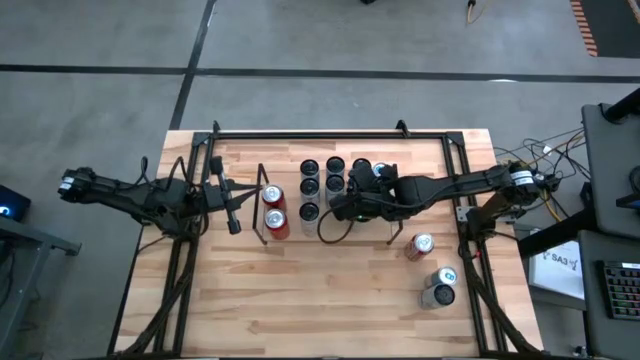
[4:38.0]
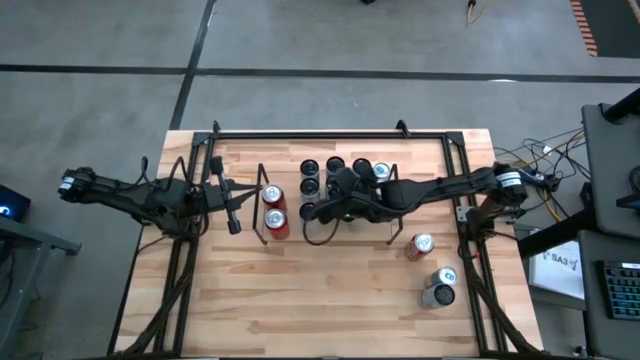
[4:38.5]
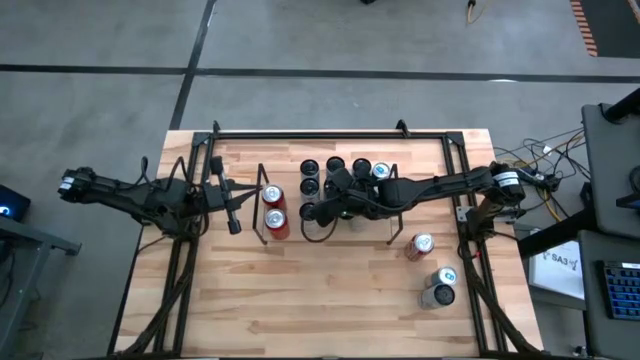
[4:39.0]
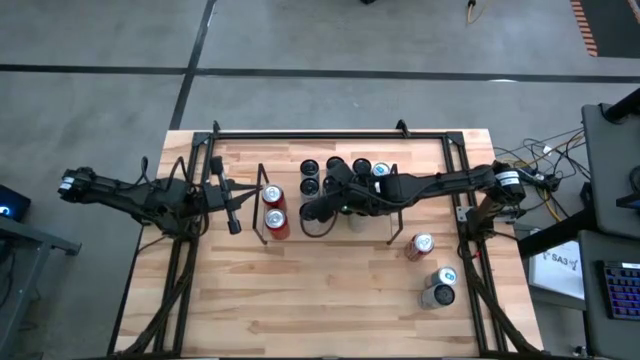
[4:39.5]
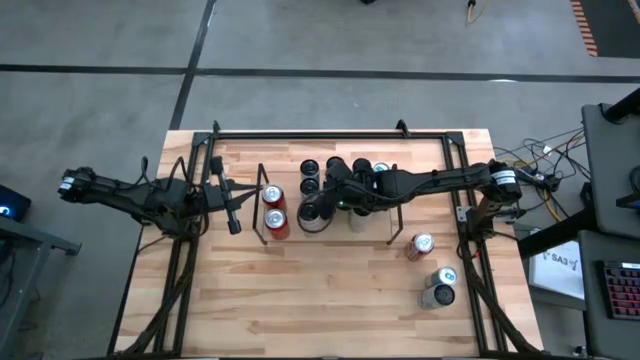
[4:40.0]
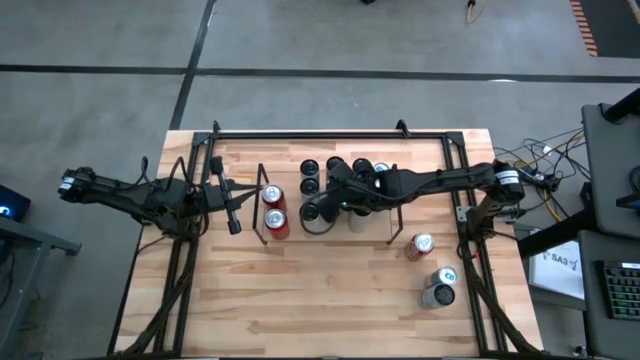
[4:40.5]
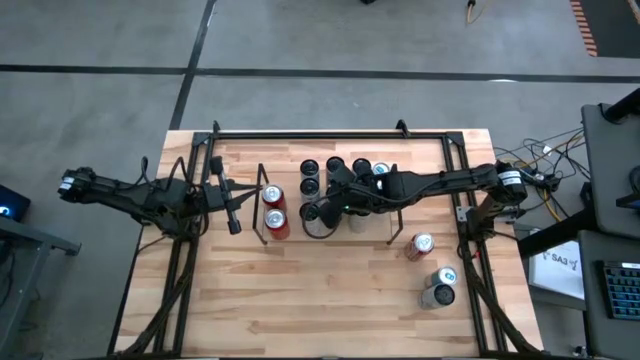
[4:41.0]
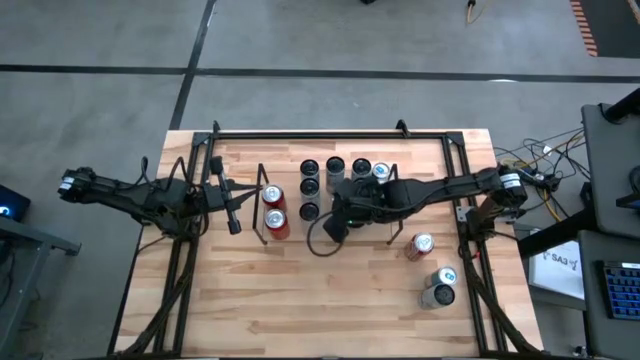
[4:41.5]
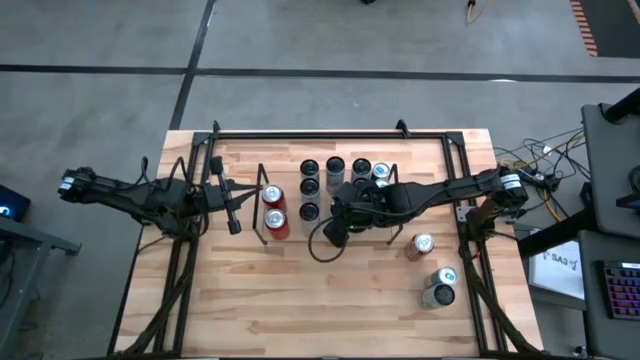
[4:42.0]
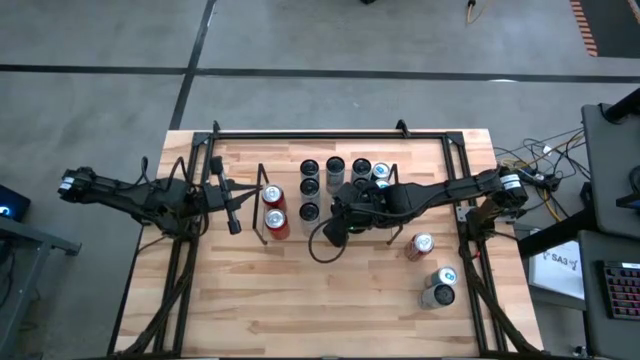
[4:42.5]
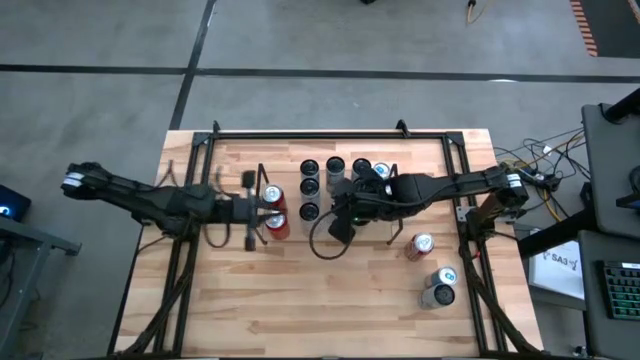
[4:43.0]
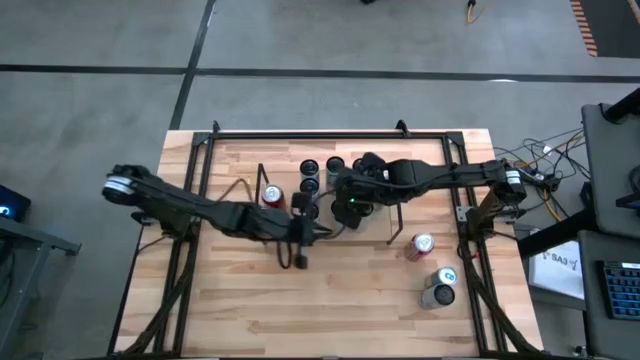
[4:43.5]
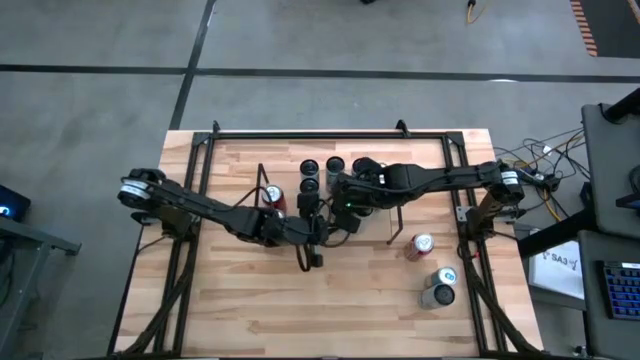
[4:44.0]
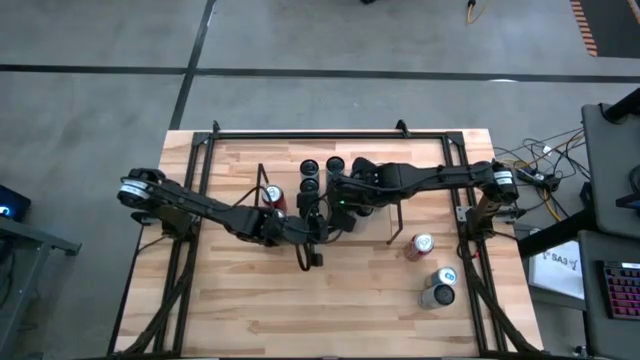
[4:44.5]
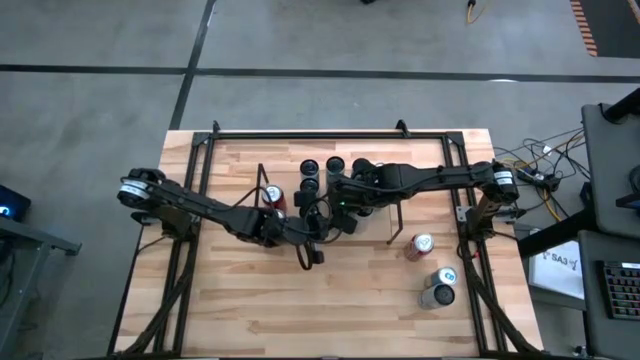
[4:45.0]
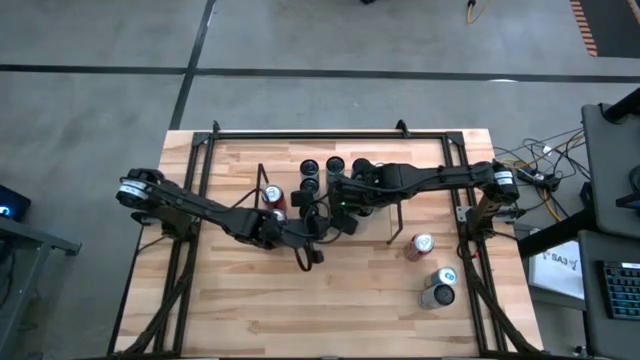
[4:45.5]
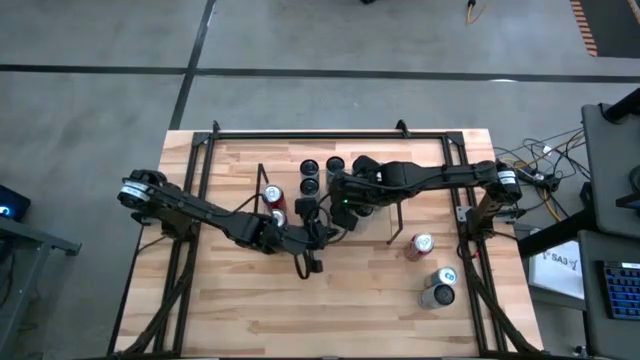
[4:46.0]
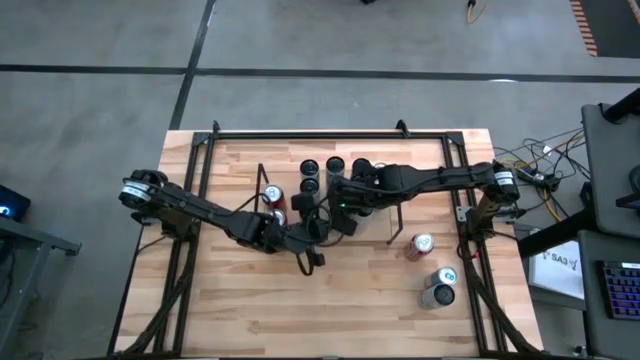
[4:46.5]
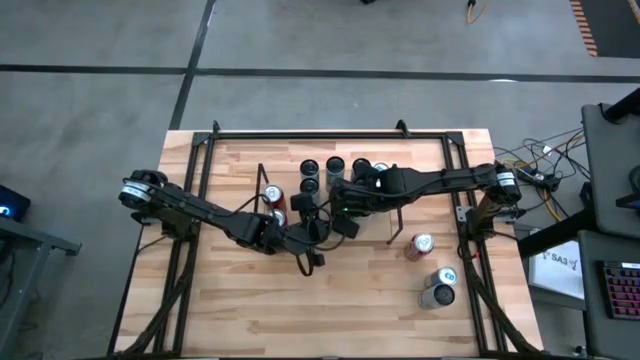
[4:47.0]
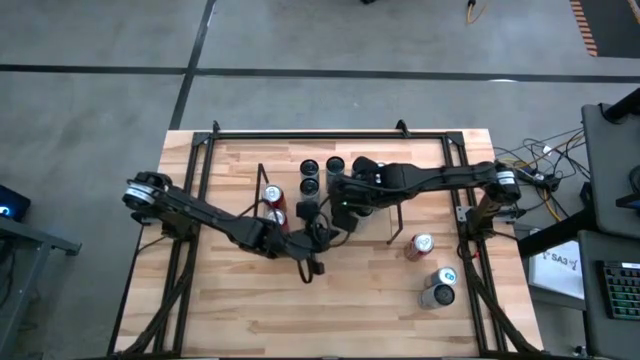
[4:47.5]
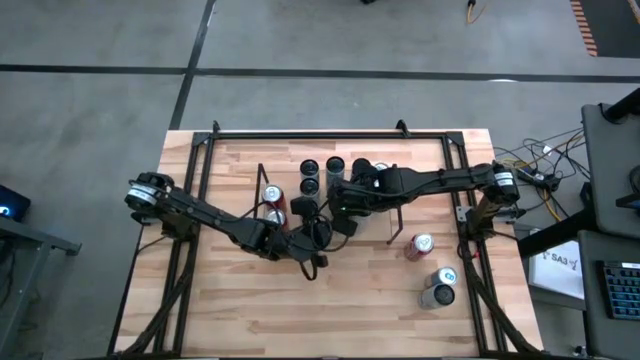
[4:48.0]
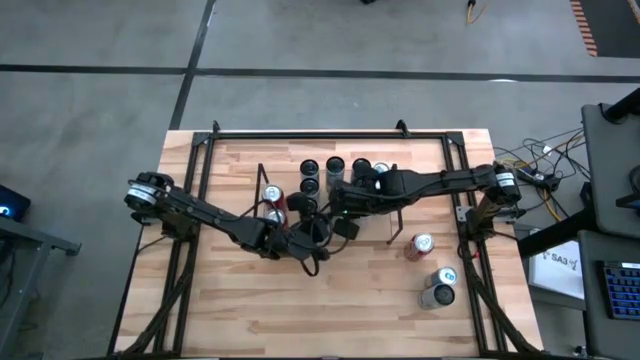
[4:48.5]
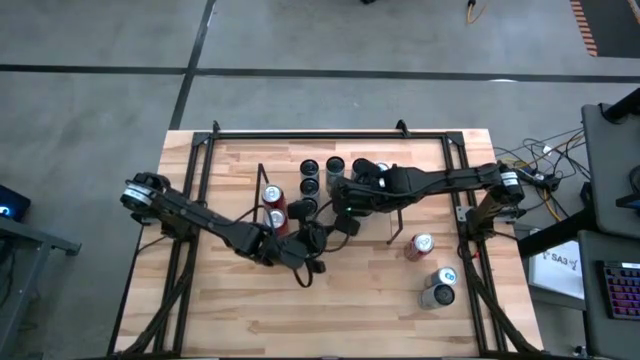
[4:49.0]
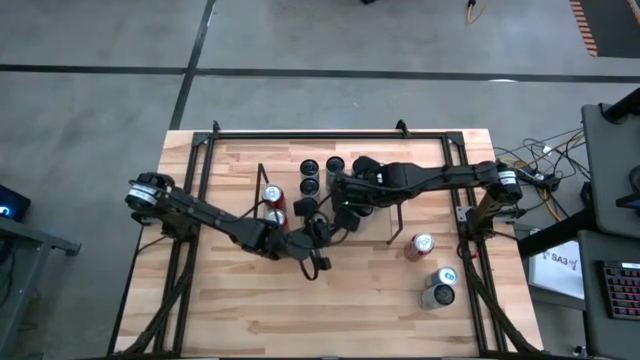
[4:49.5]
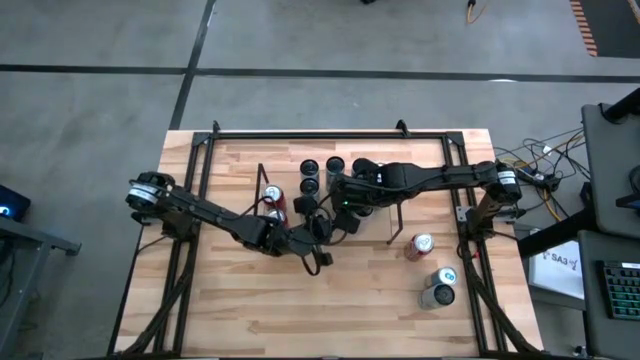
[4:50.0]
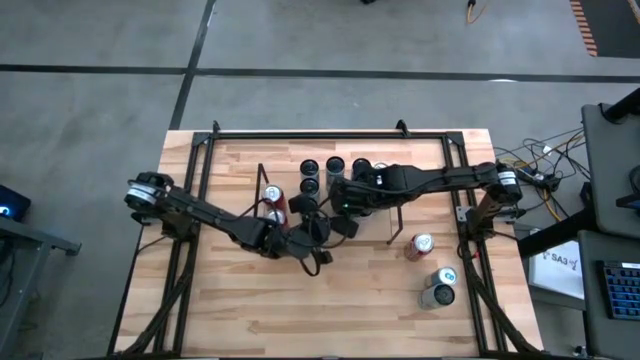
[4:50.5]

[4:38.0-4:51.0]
Task: Place canned beverage on shelf
Adjust the white and blue soda cans

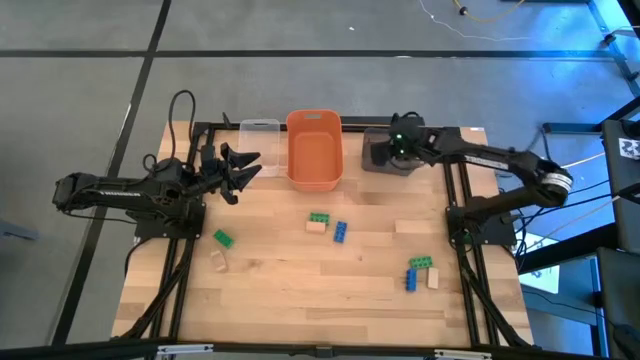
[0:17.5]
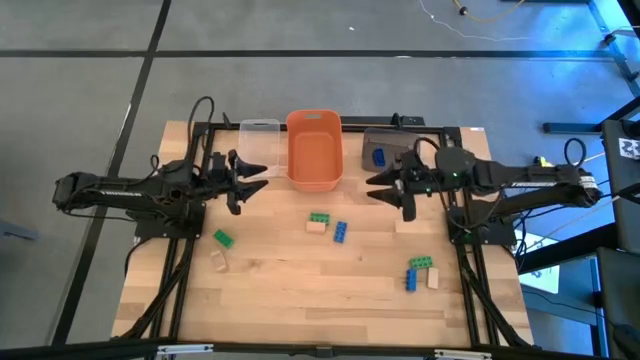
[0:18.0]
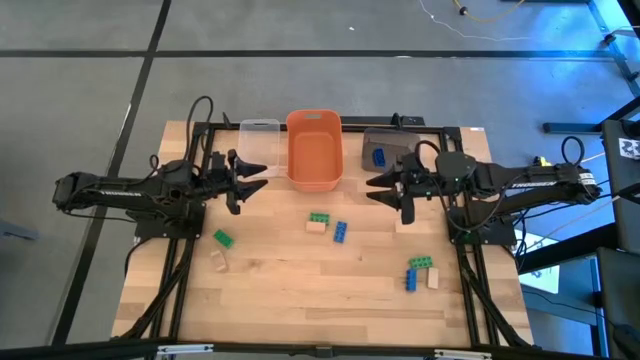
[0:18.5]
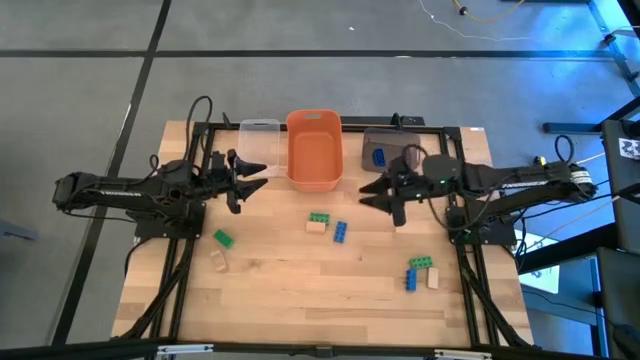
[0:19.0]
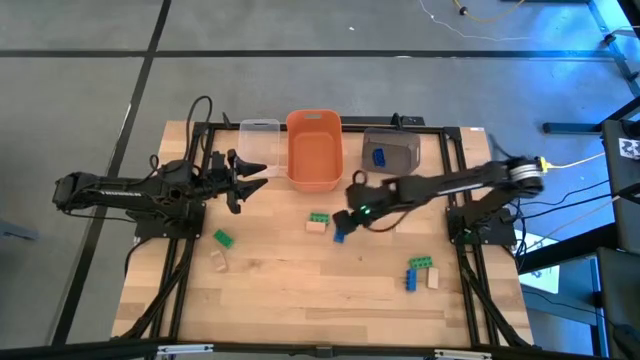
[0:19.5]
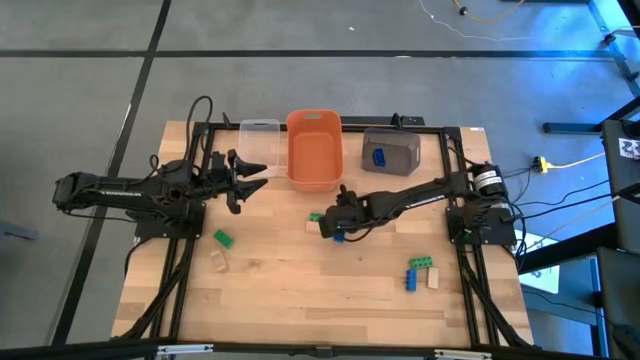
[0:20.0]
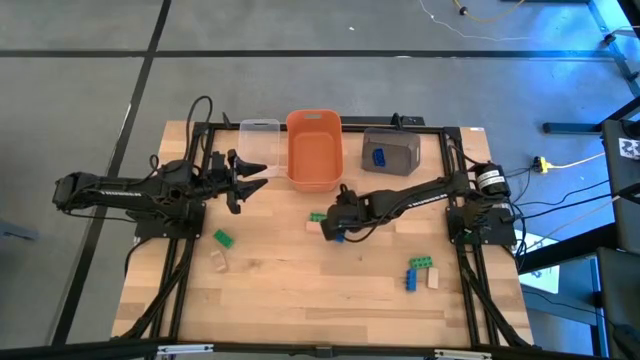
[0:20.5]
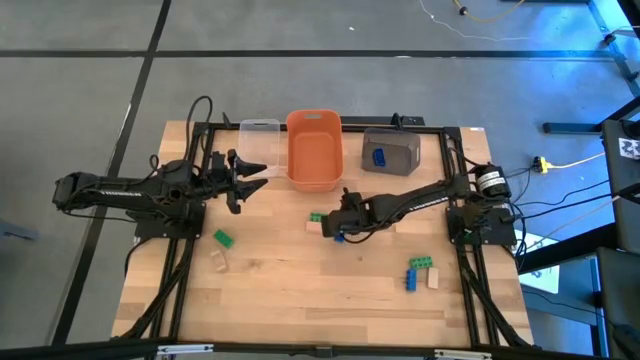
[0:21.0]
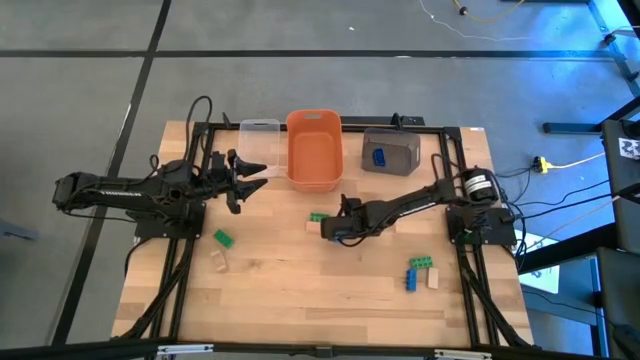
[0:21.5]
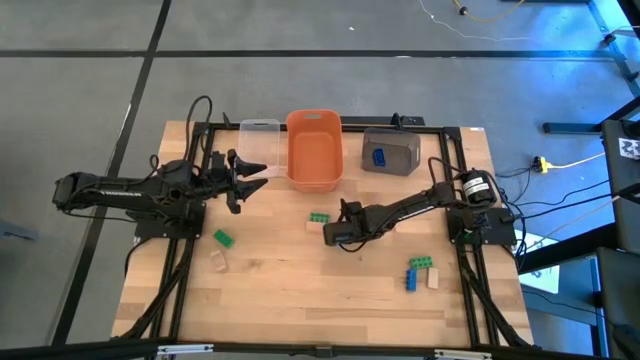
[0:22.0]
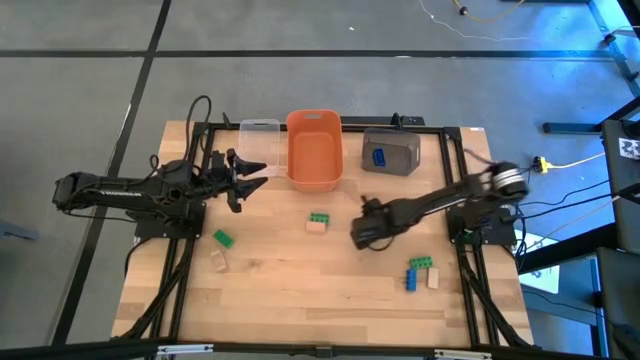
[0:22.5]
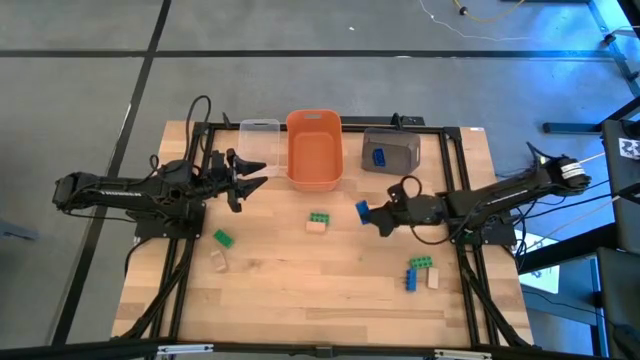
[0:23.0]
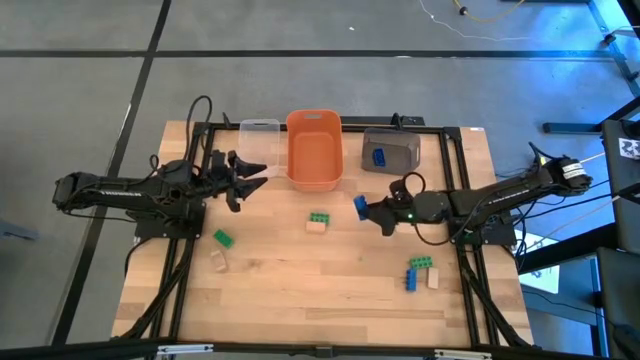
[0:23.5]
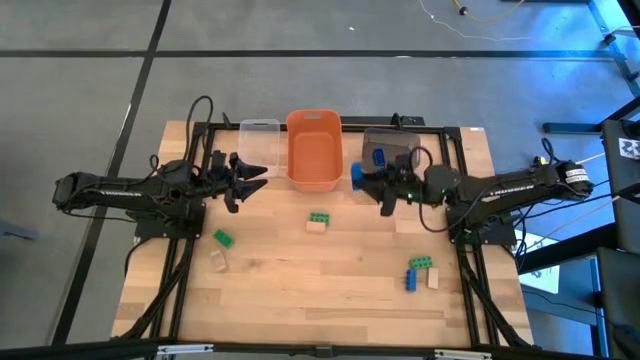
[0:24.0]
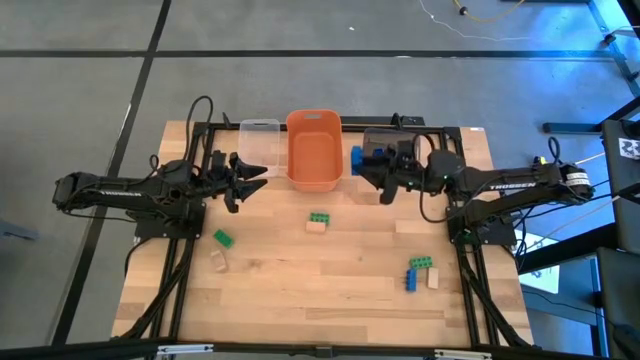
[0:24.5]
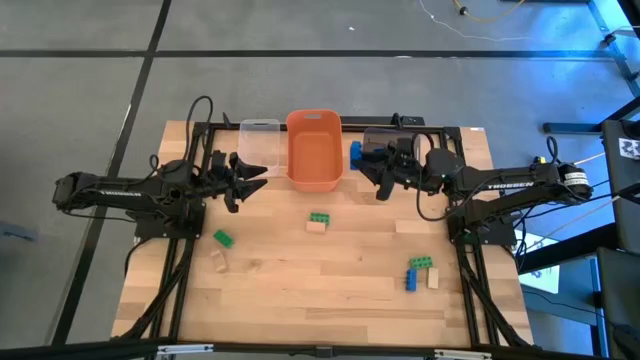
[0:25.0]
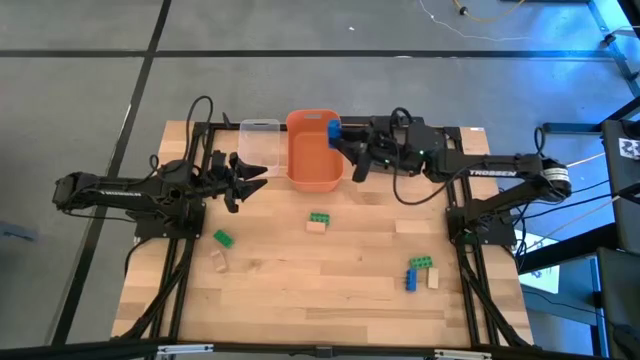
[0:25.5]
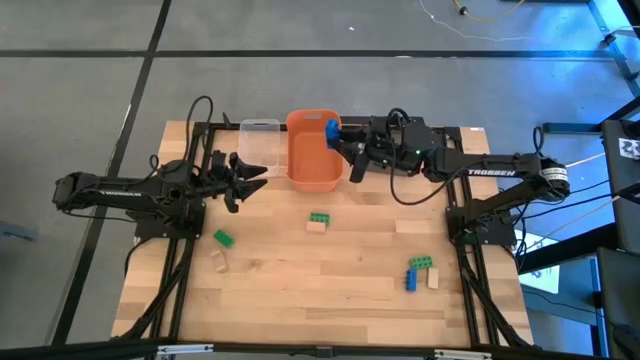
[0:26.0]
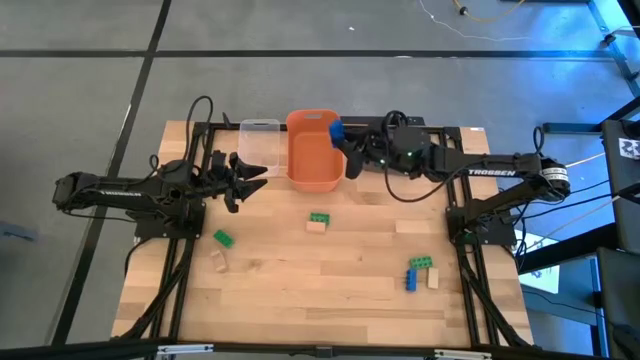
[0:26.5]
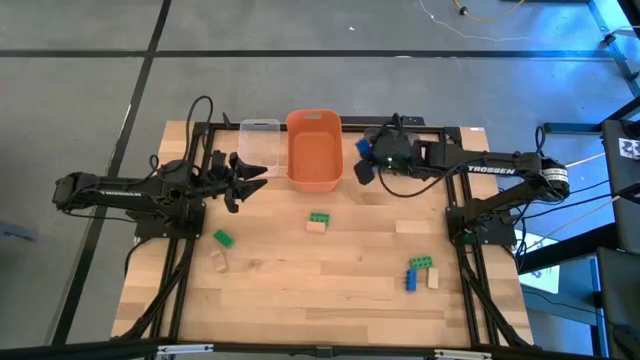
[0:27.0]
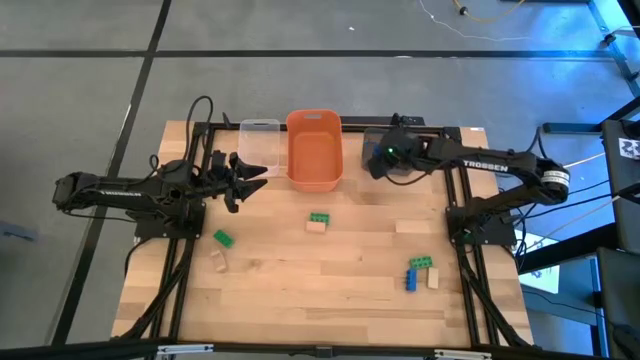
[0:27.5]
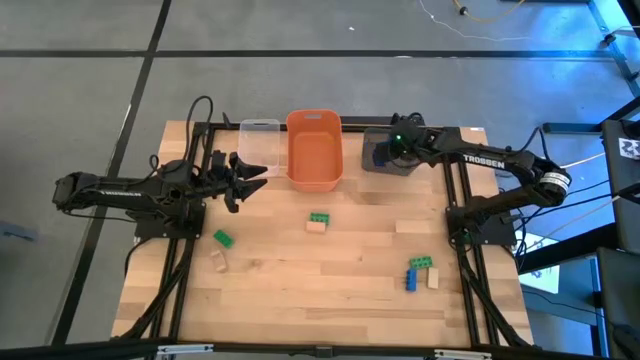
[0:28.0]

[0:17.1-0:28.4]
Task: Sort & place blocks by color
Put the top blue game piece into the black bin
